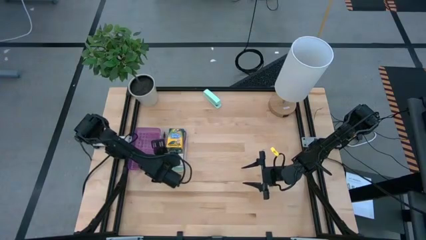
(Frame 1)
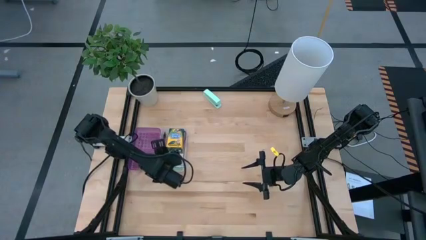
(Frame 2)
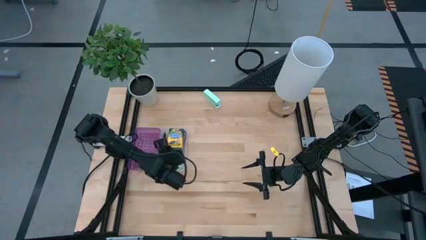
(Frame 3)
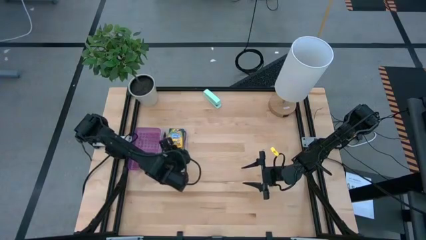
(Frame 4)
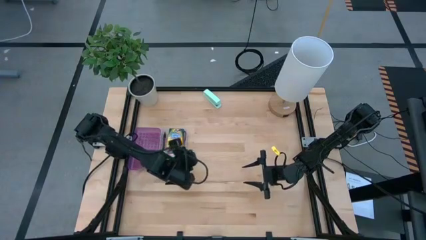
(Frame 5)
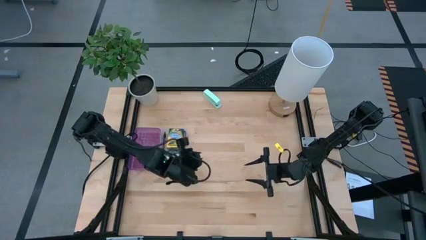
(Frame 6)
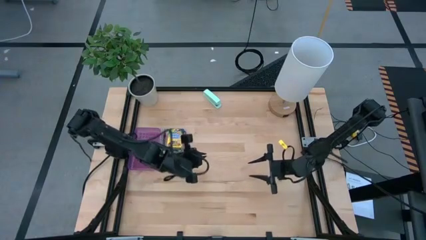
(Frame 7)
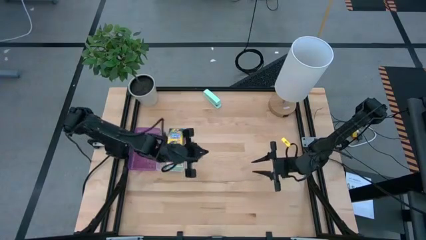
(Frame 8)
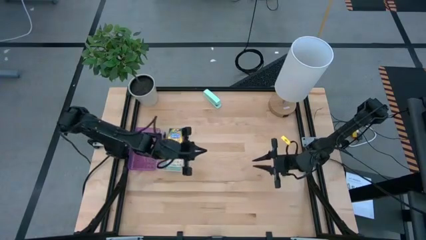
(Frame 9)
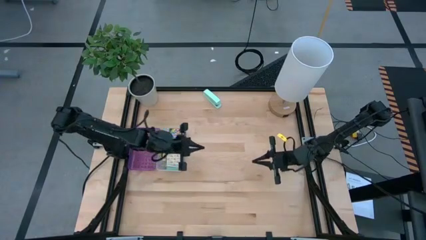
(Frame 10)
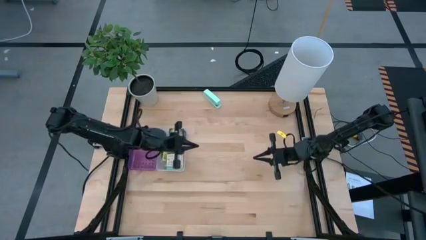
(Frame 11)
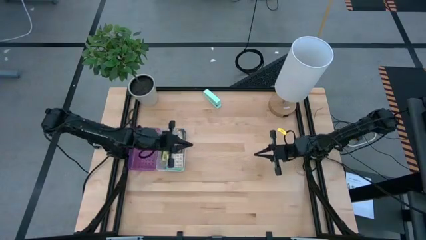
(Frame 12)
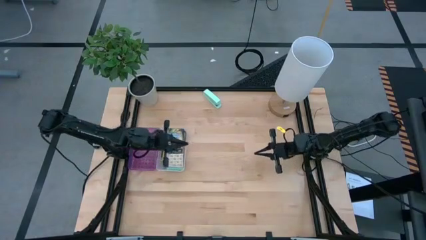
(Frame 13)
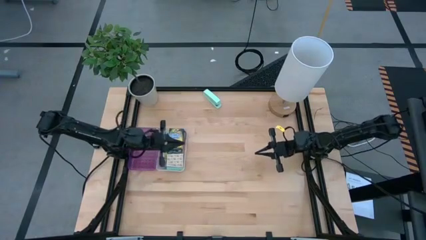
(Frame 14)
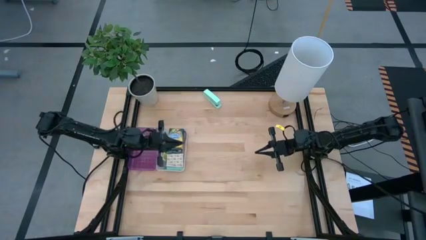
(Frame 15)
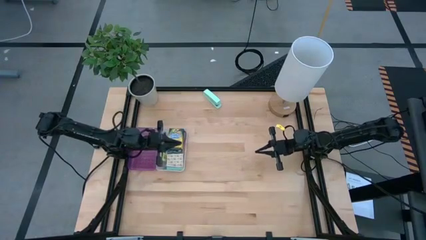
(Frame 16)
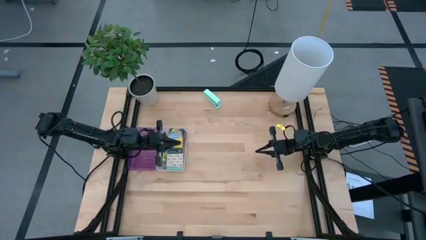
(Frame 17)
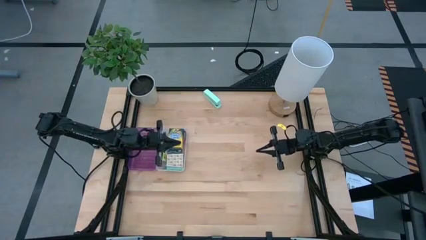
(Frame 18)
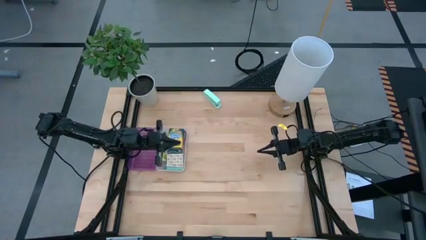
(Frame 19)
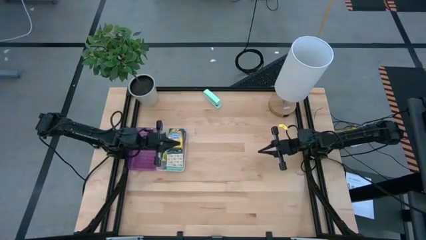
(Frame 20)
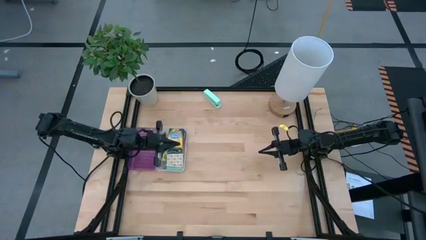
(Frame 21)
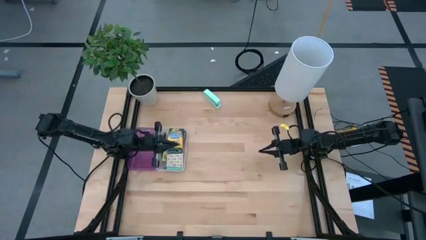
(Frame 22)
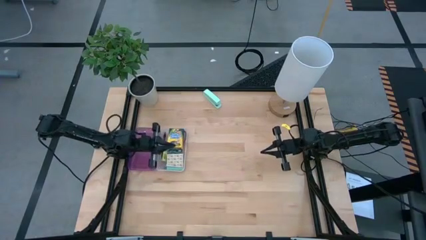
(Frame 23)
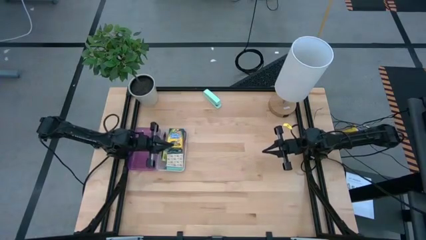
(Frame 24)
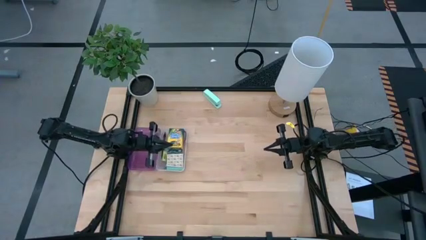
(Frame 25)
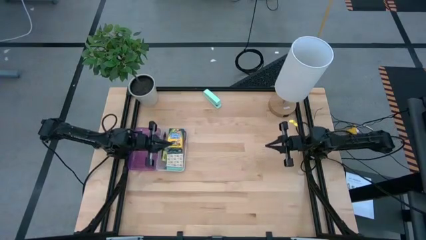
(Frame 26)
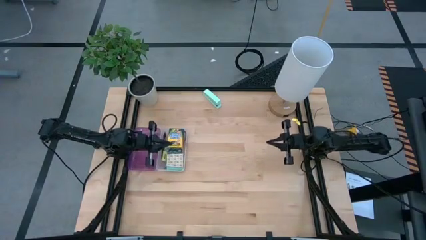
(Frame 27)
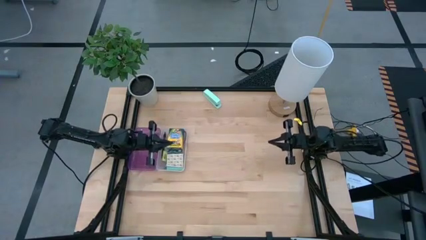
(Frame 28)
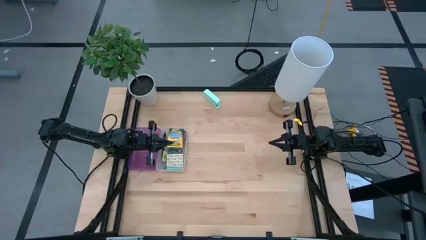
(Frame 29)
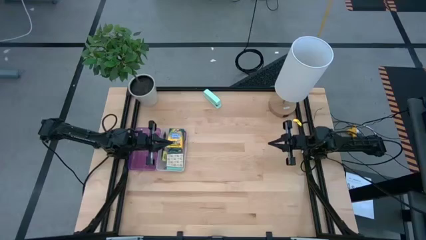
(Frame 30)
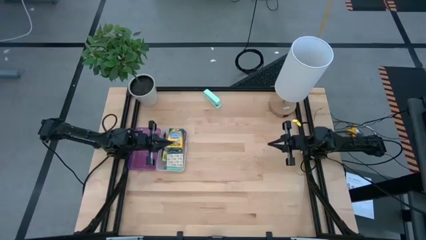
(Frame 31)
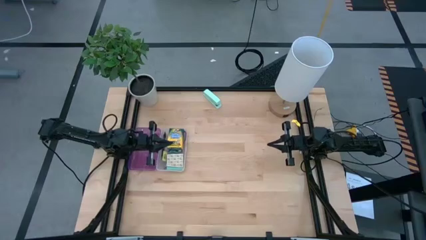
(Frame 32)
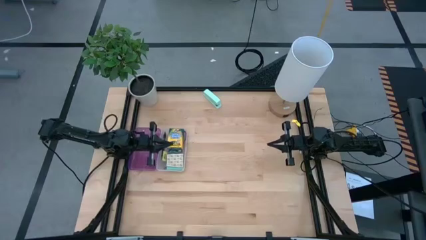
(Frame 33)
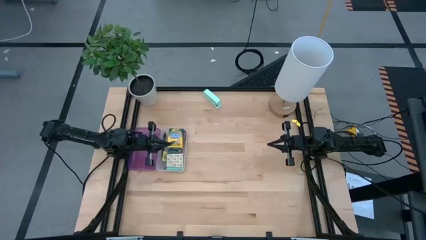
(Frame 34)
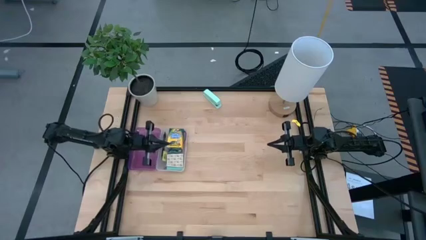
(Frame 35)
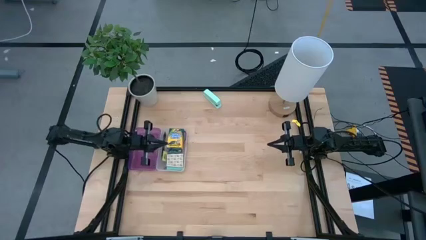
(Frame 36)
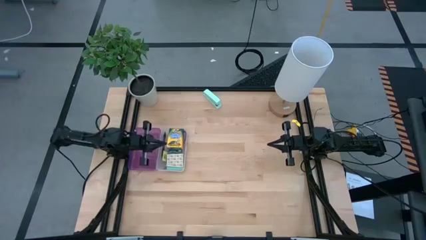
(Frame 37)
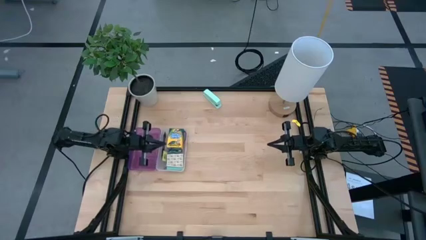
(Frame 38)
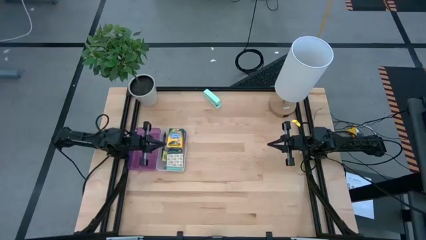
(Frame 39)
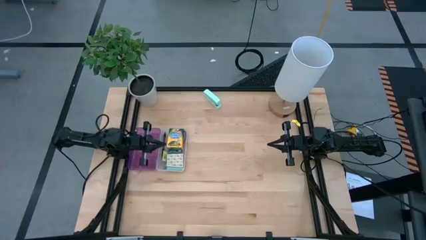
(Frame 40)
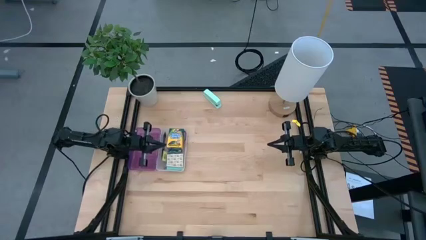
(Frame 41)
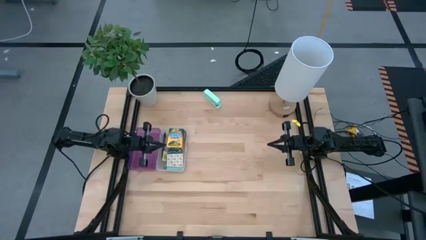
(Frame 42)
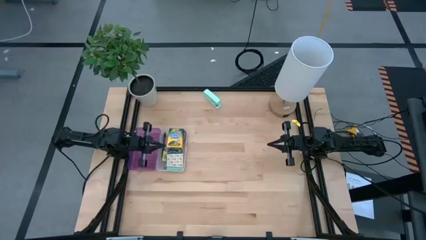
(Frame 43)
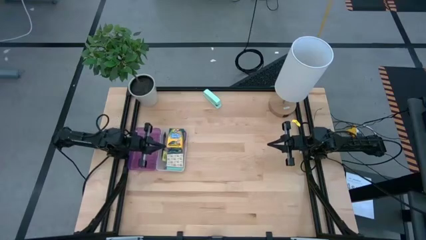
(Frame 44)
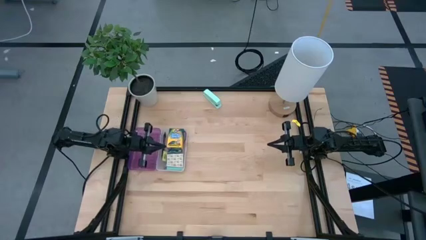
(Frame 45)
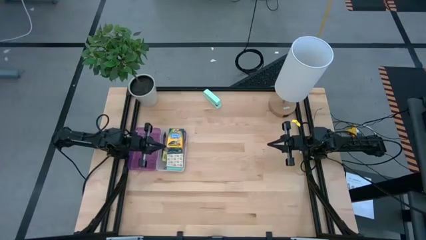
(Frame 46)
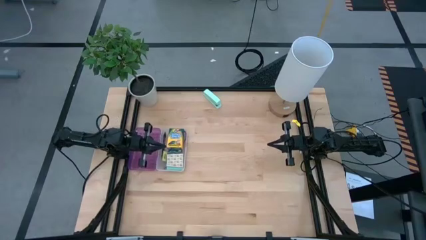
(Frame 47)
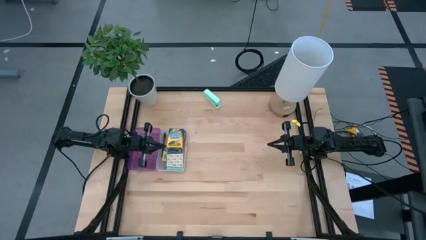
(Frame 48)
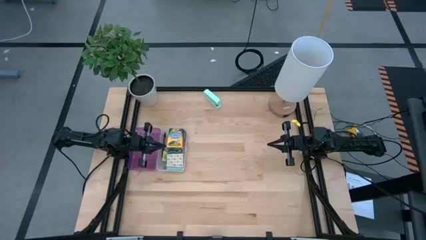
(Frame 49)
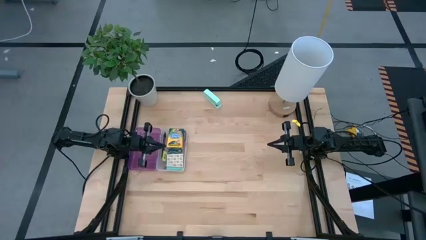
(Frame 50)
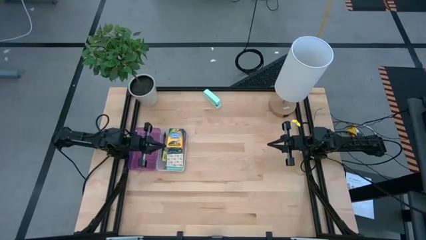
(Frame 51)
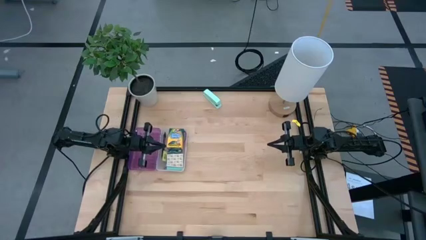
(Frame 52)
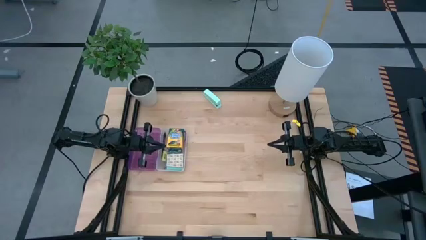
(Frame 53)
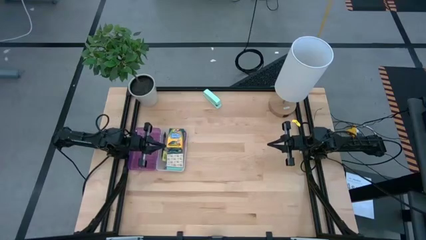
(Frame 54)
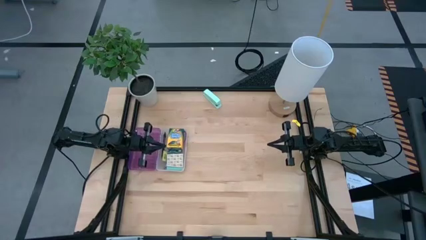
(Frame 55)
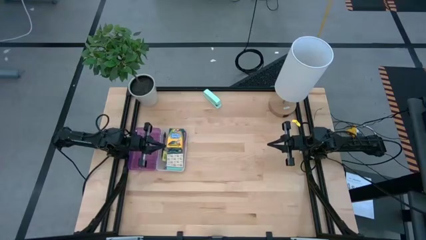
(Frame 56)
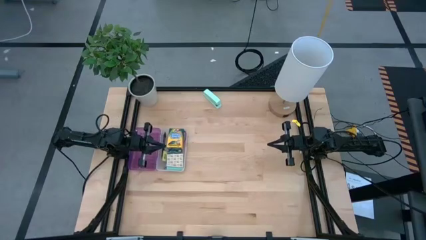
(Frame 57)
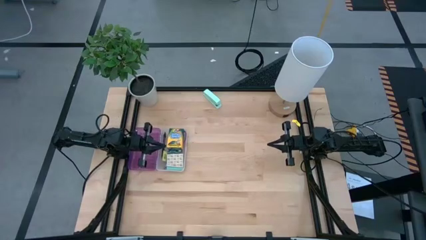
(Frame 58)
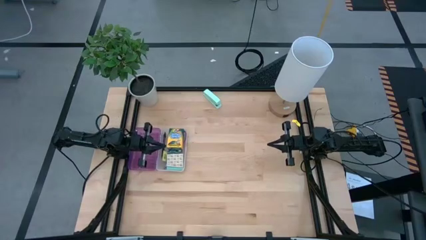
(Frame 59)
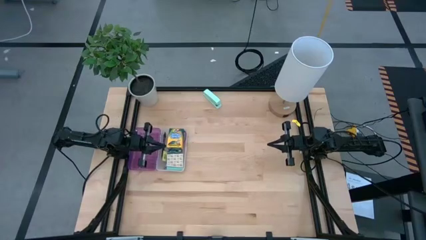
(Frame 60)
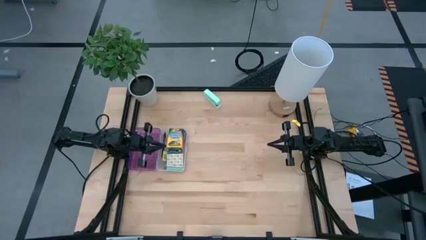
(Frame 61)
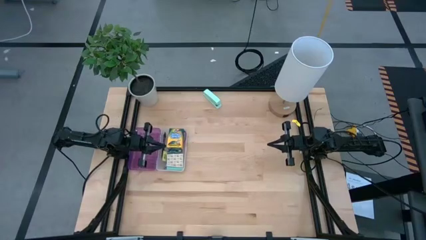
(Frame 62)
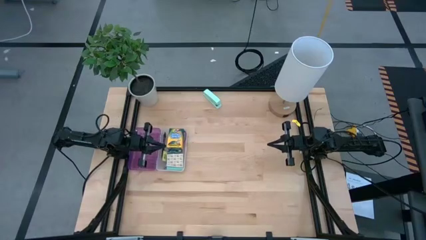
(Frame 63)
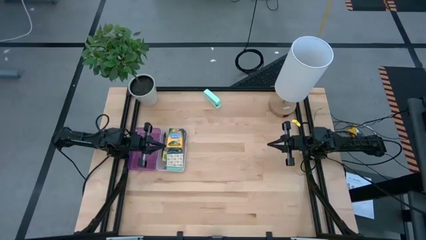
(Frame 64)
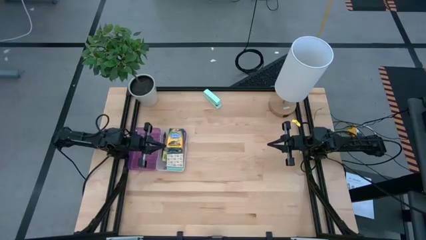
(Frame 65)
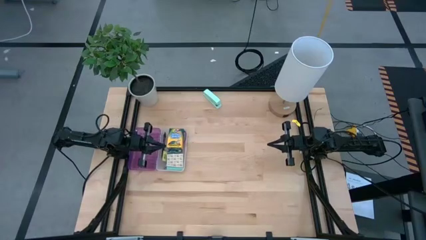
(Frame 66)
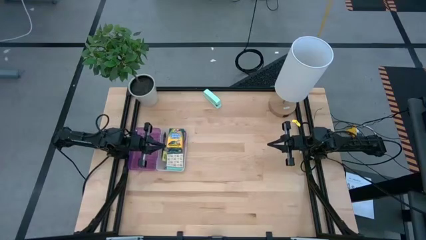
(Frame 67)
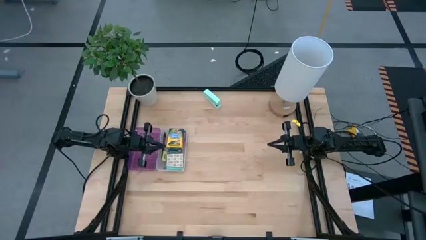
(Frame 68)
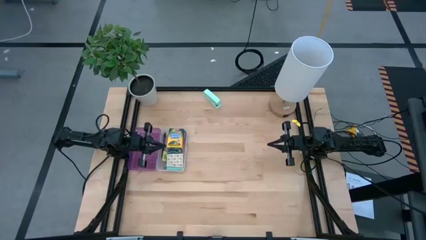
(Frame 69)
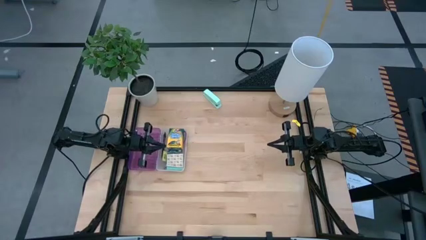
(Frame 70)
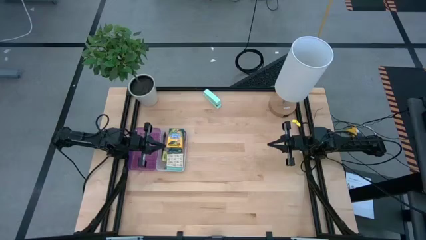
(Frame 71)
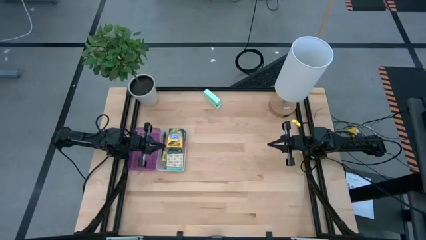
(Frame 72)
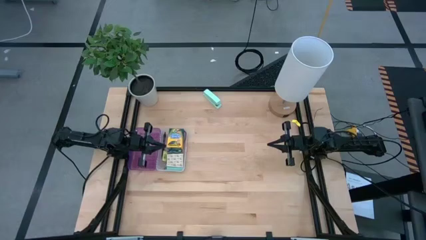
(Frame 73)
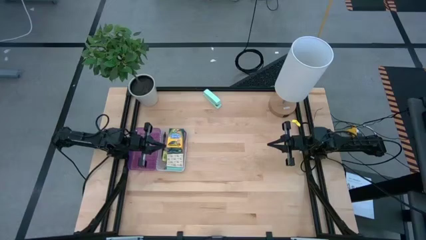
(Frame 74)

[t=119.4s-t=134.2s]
Task: Pack school essentials
Return to Home Position

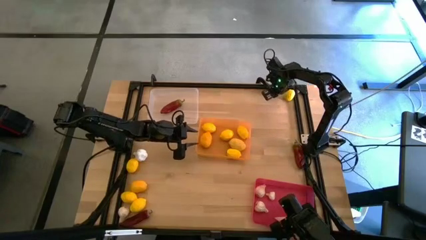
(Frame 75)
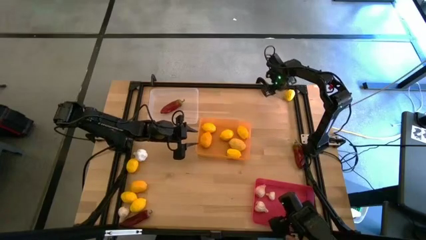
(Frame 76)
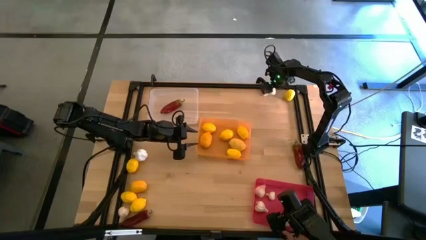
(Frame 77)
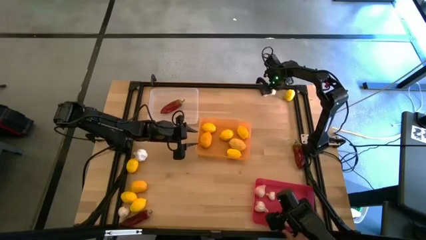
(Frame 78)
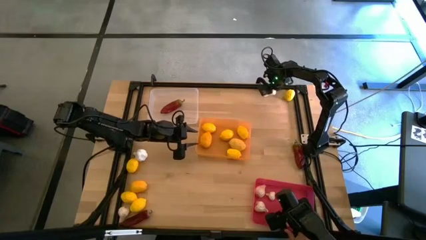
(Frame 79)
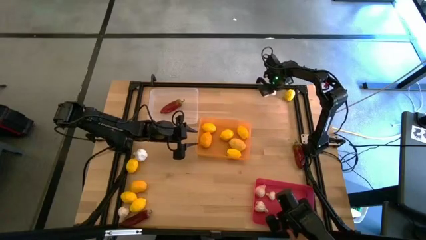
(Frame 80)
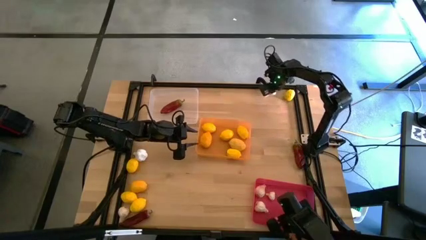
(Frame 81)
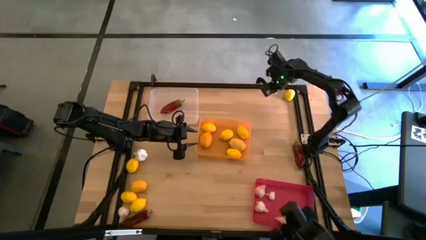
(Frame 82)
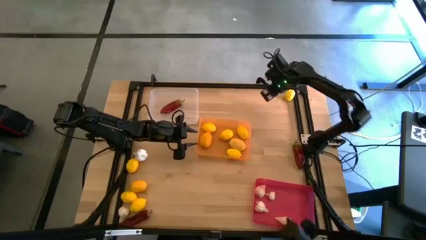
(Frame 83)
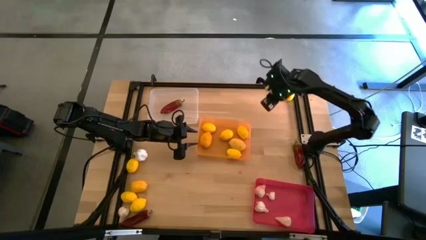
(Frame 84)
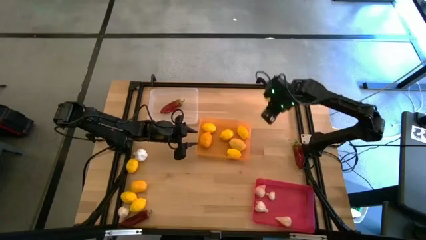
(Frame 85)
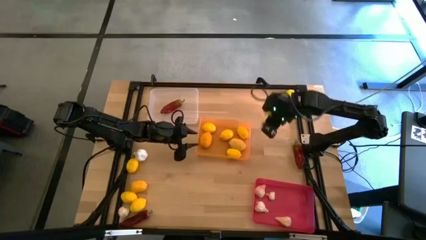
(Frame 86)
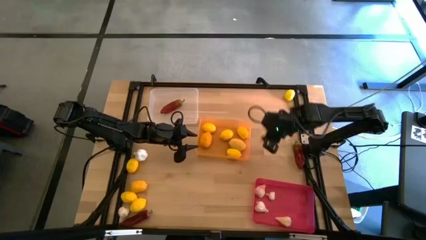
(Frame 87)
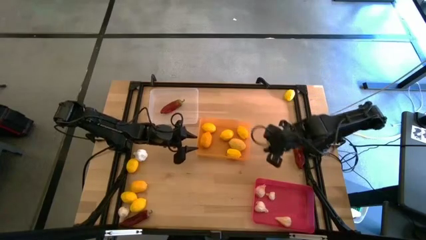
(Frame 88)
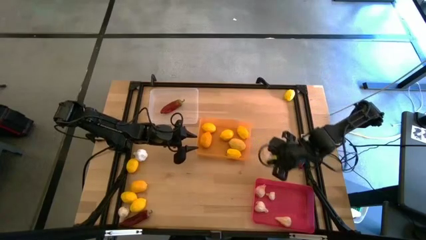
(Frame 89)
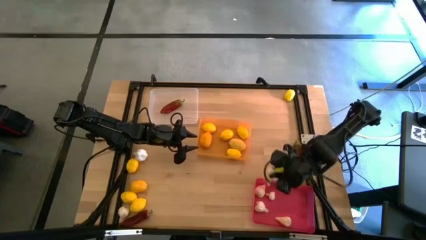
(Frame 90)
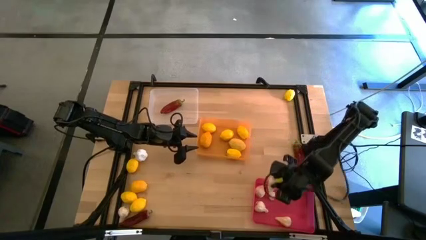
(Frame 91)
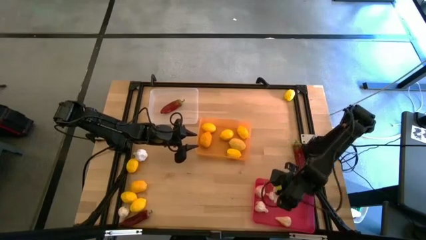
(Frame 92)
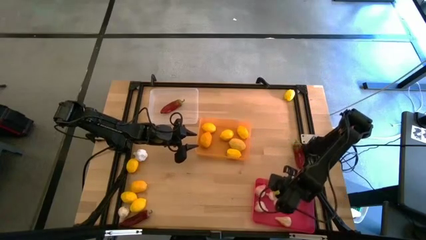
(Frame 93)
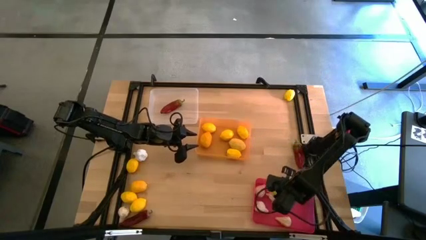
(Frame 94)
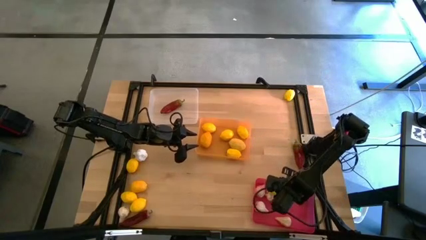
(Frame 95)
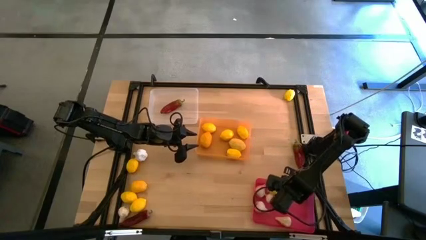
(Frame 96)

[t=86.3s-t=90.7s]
Task: Sort produce into baskets
Put the garlic into the red bin
